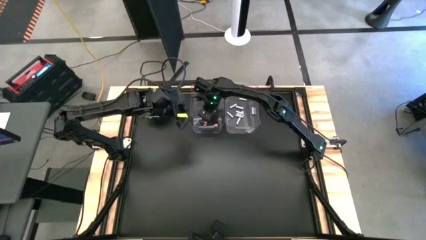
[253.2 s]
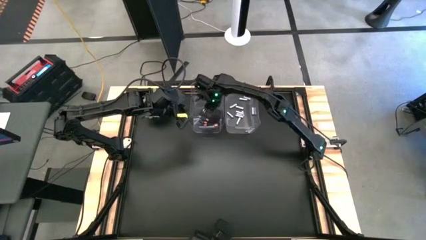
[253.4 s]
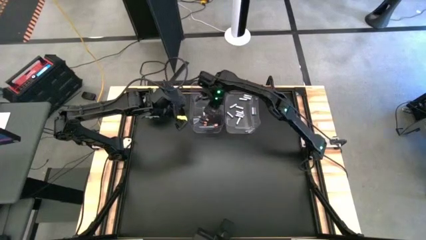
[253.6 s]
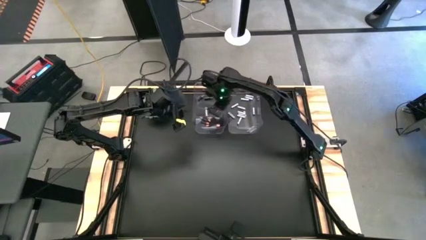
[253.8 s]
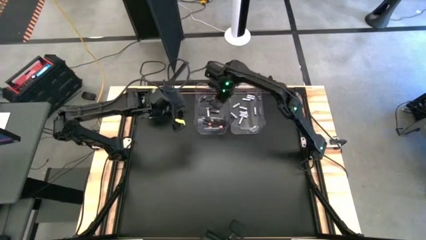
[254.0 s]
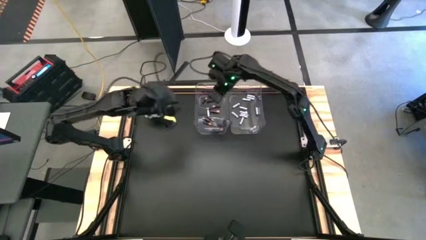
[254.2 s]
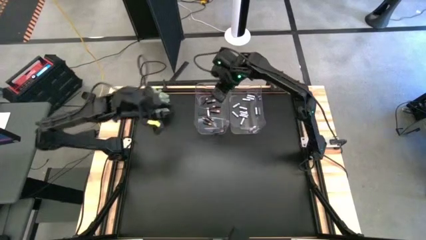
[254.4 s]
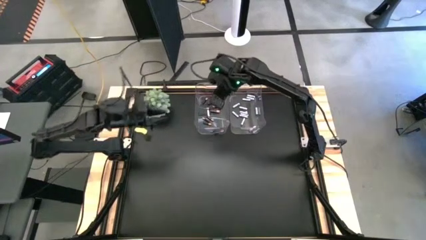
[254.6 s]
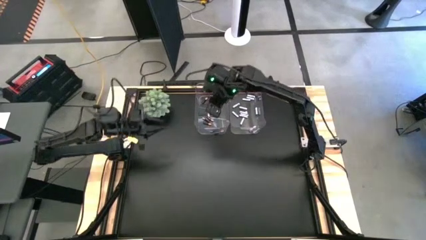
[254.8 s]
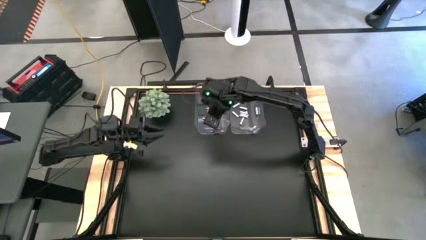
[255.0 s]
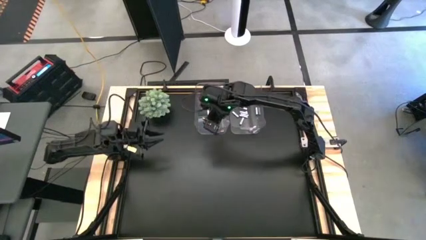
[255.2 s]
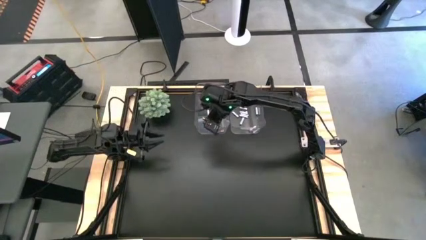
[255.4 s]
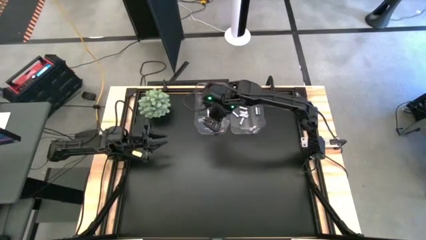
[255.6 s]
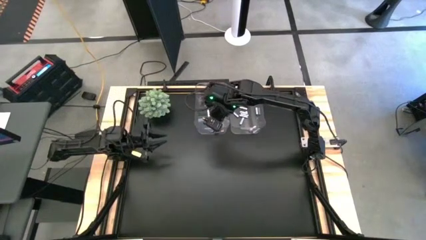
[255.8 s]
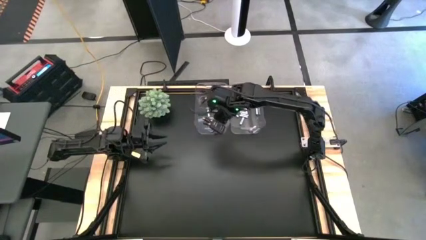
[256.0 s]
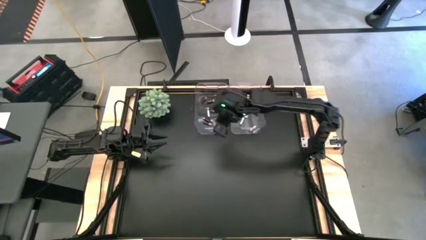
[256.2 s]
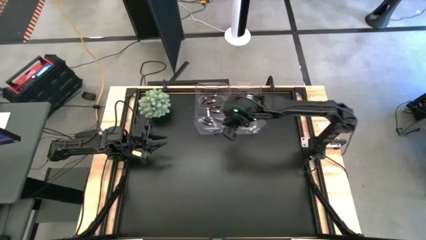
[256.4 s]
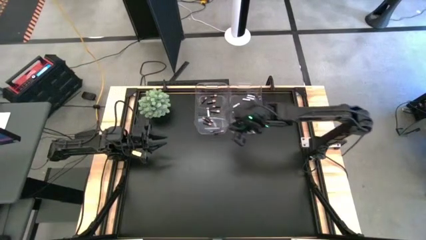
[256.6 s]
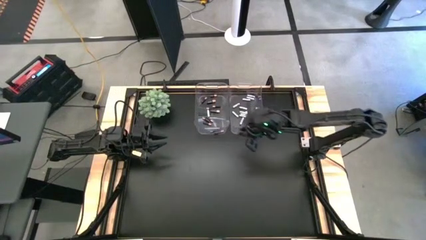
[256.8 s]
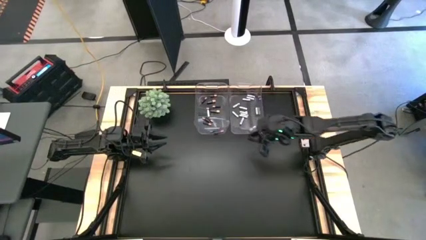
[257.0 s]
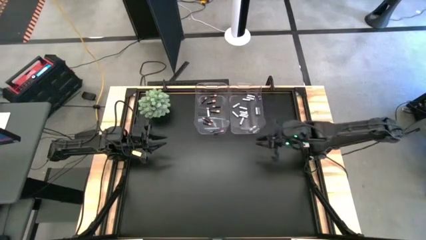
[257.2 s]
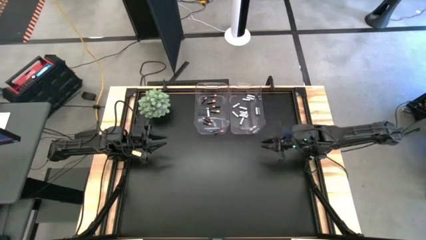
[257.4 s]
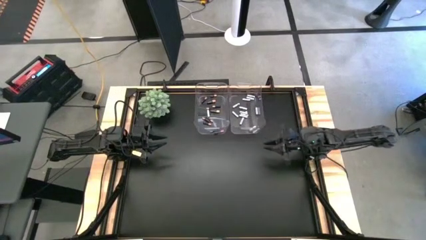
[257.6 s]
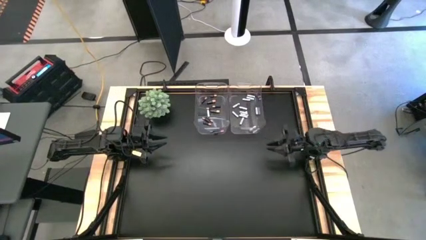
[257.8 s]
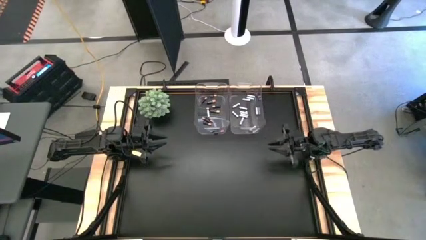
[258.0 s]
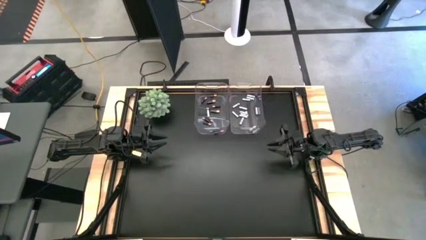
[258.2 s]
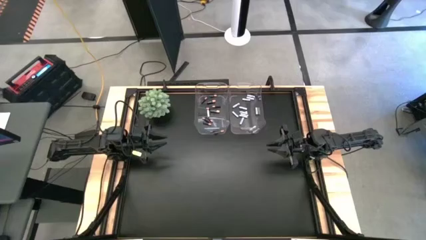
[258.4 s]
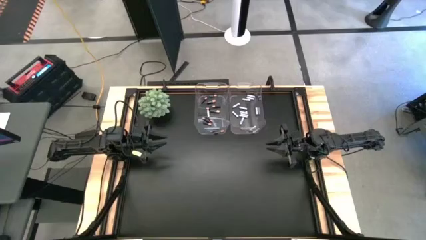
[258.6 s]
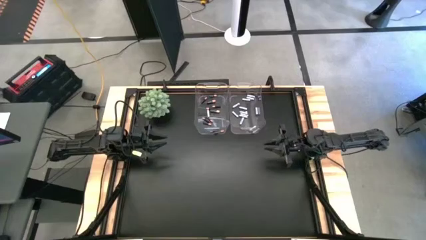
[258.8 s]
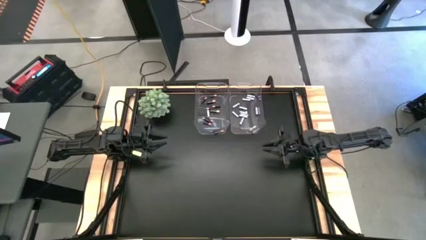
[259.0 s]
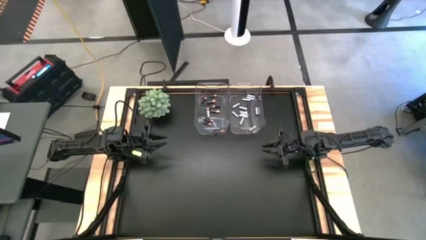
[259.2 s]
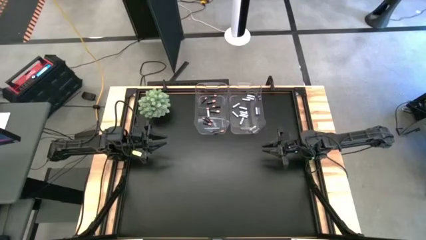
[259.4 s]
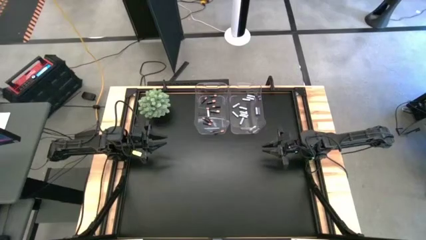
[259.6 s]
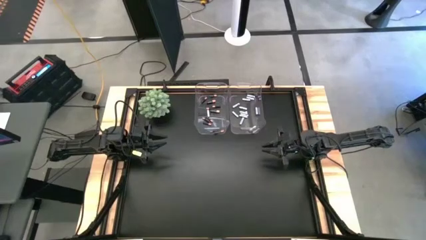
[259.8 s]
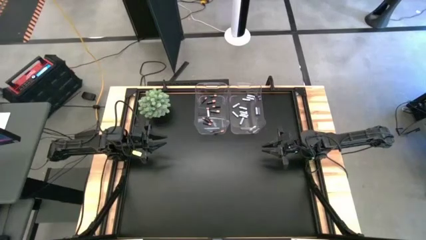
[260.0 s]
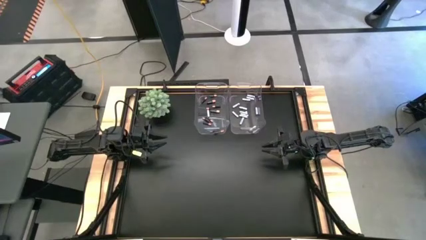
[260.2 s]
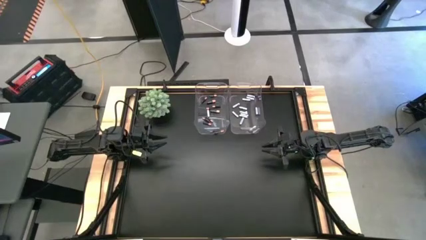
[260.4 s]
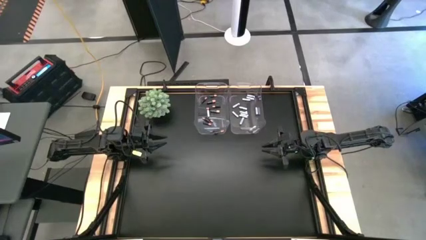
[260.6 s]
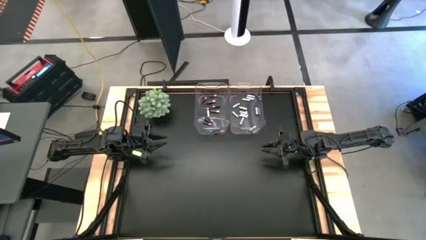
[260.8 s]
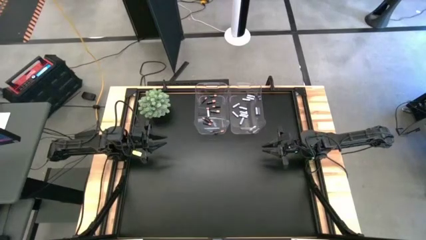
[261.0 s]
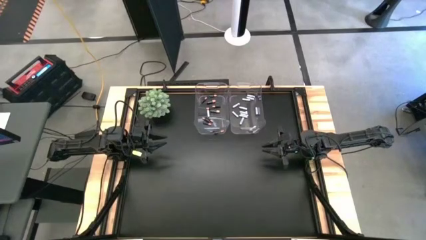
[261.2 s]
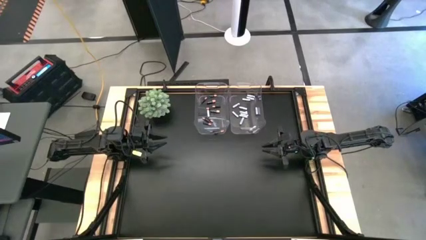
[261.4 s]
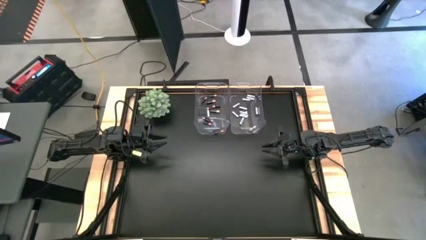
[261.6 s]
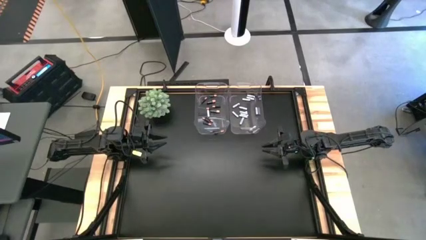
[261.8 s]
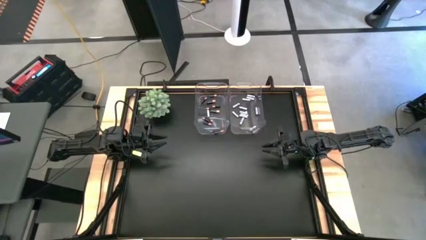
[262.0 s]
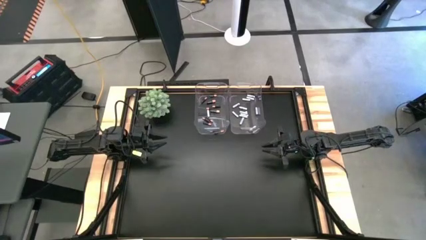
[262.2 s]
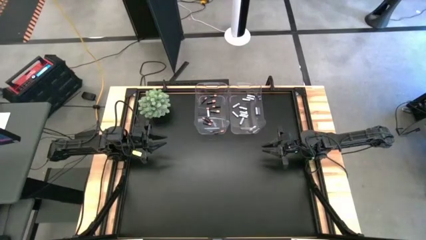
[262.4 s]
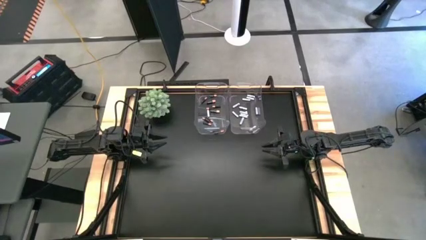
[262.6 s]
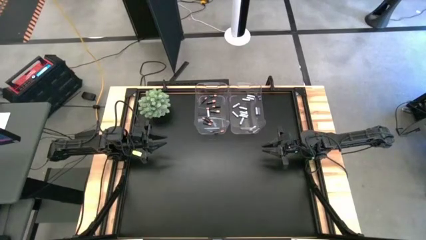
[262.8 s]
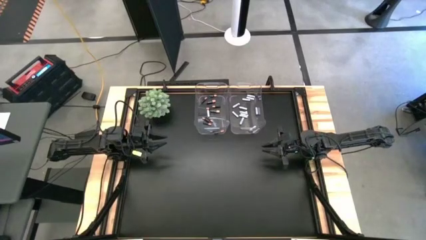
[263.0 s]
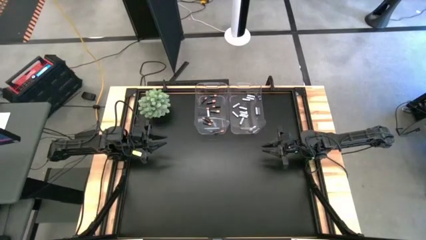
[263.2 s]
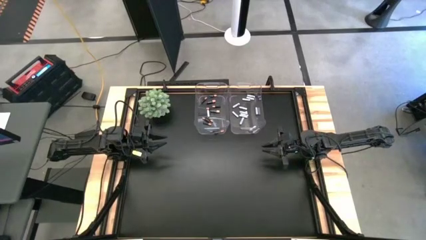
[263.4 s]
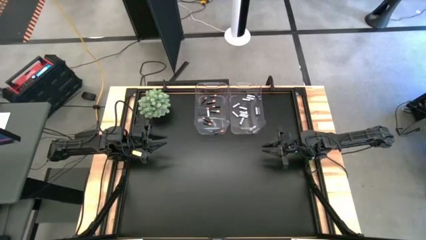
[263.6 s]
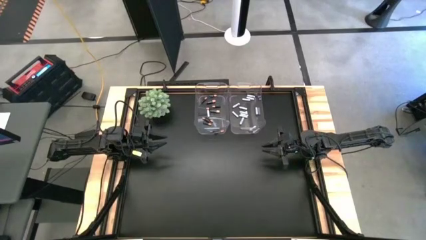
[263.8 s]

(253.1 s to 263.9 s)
Task: Sort batteries
Return to Home Position

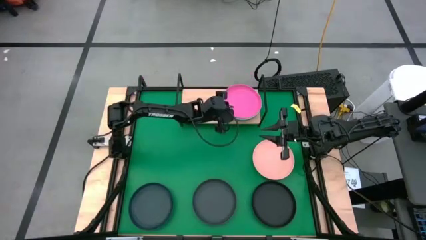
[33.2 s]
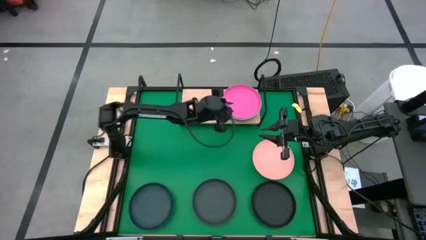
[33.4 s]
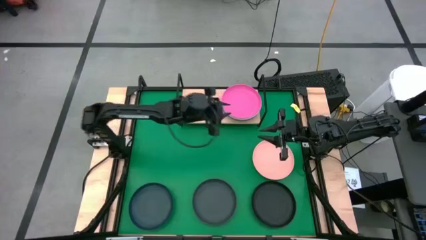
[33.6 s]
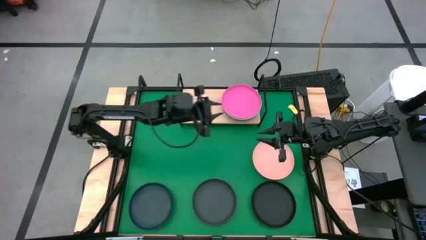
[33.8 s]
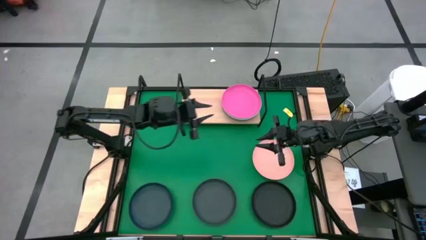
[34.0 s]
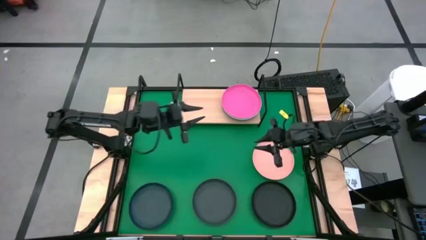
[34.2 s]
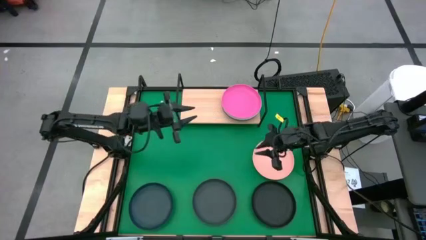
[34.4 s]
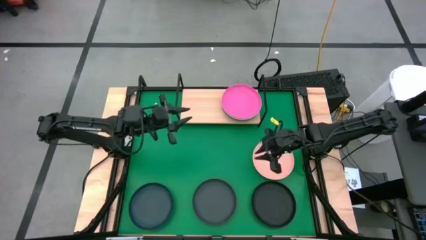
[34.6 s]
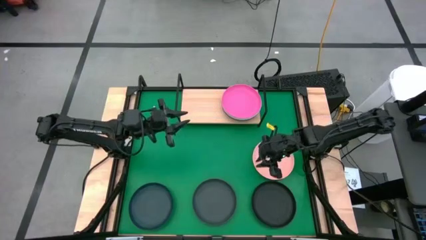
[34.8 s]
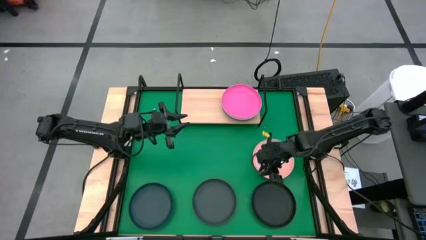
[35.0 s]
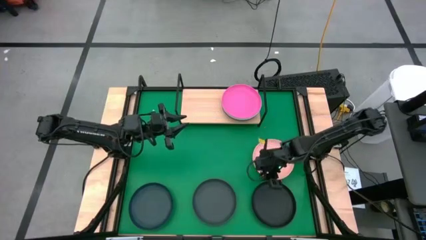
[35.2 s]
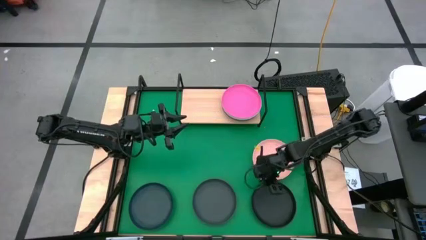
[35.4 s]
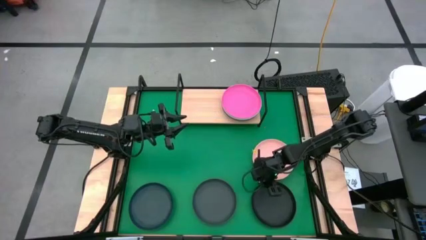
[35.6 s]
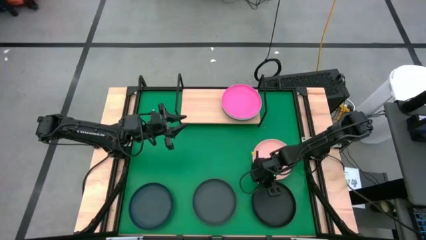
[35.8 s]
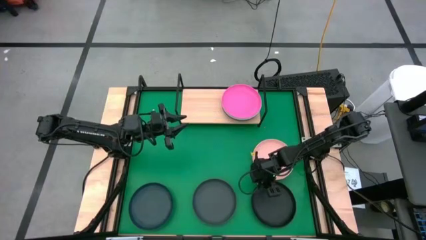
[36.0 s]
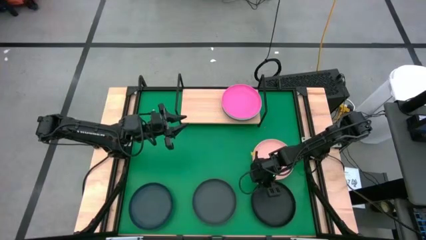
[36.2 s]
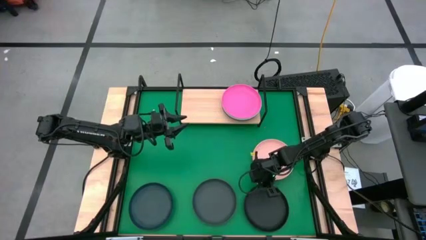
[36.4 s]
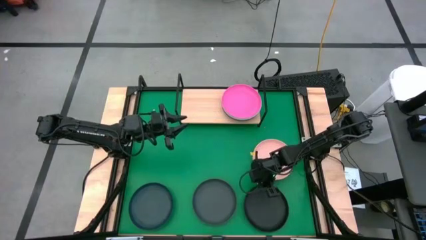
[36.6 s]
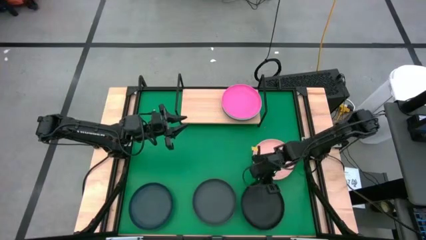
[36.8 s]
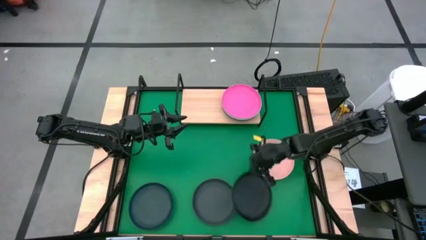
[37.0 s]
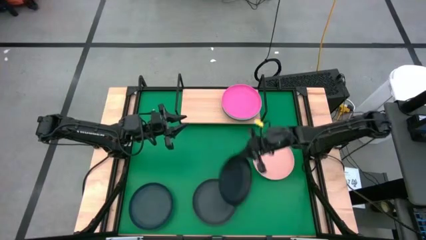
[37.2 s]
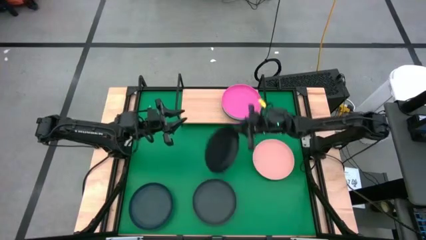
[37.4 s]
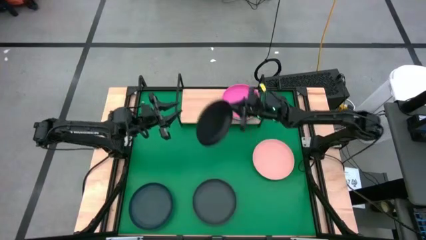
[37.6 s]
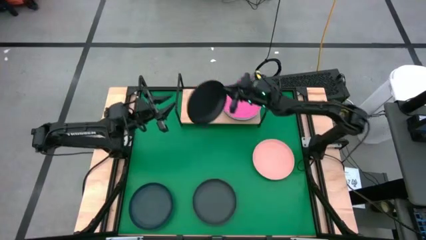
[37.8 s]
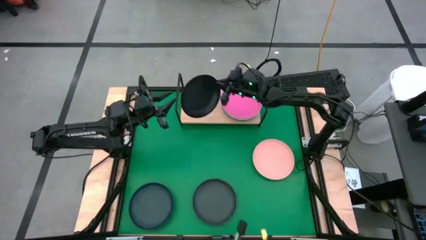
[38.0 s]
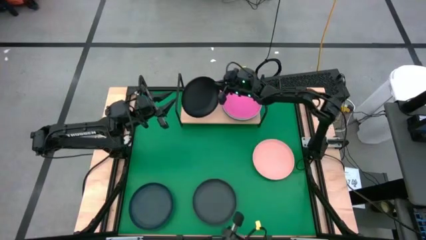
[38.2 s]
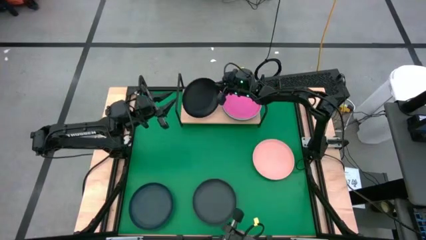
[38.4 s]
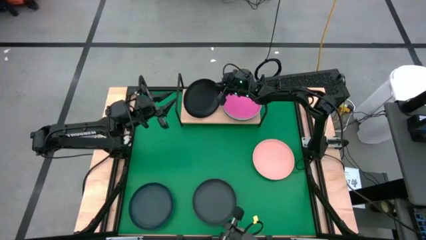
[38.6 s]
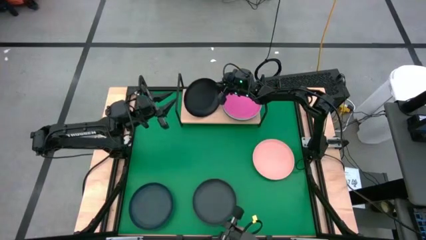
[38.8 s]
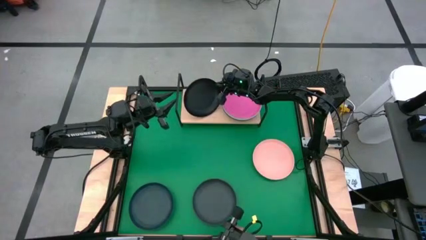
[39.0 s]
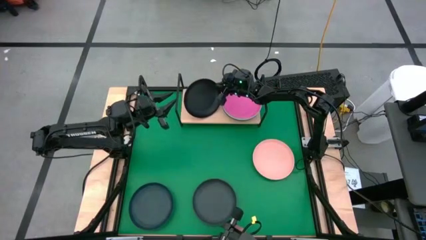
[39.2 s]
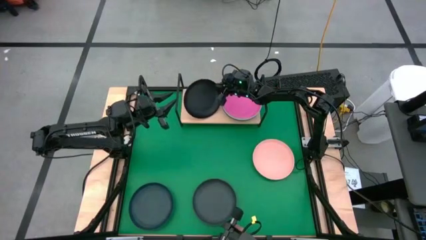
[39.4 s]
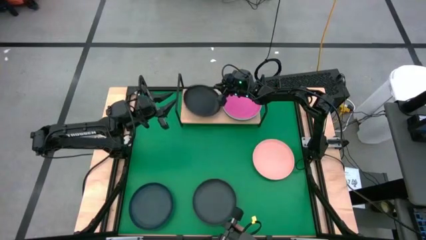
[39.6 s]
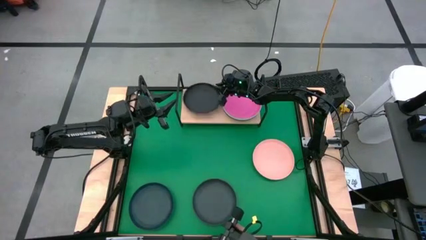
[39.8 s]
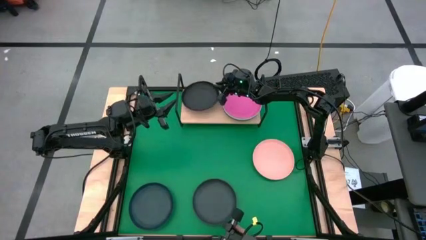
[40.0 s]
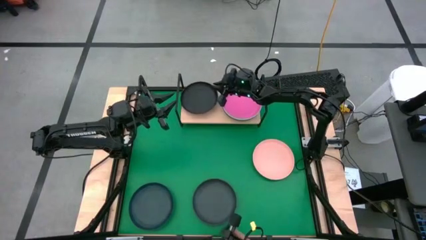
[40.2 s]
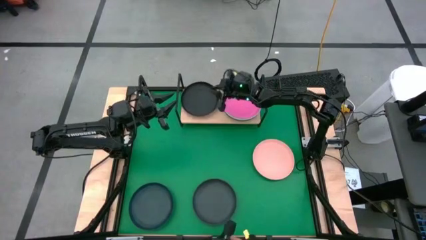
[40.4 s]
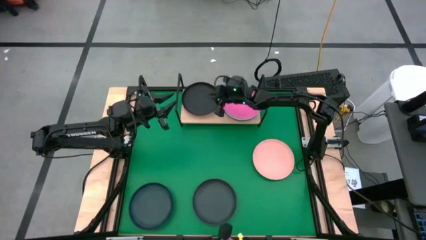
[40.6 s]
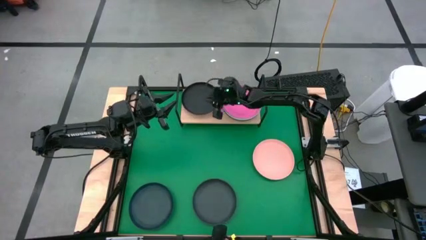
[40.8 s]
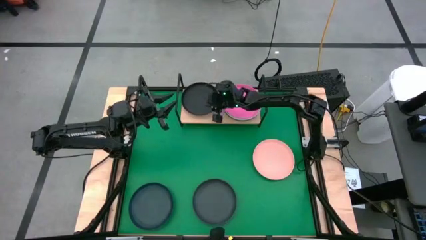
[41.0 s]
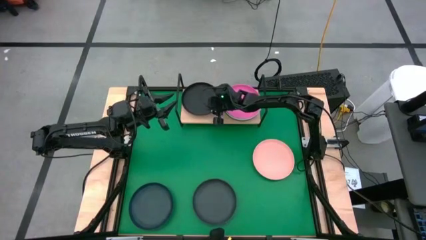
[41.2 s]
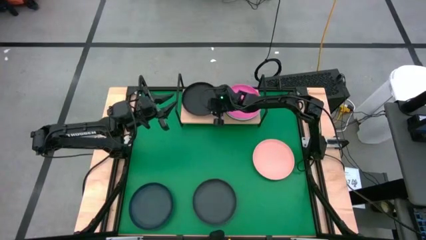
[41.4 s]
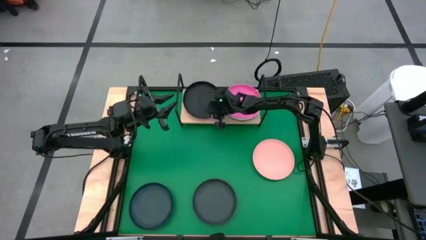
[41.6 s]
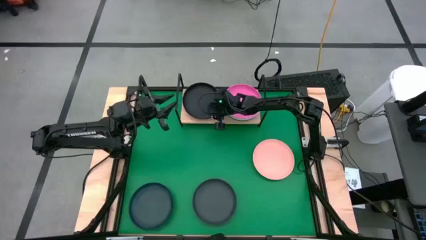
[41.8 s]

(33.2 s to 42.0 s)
Task: Place and stack plates onto a shelf
Put the right black plate on the shelf
